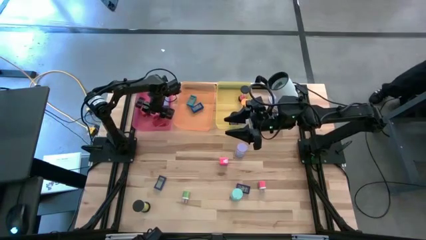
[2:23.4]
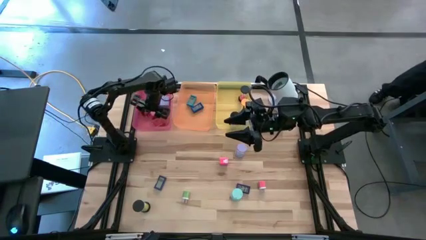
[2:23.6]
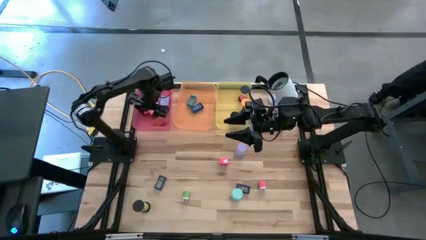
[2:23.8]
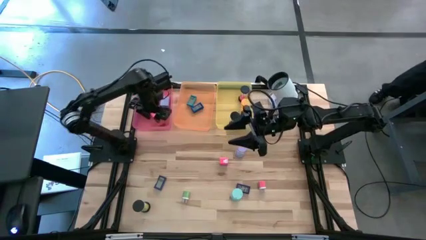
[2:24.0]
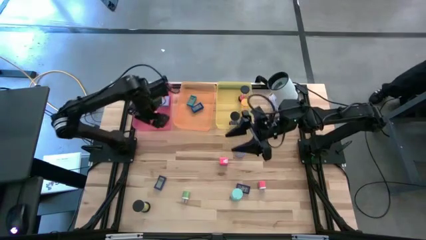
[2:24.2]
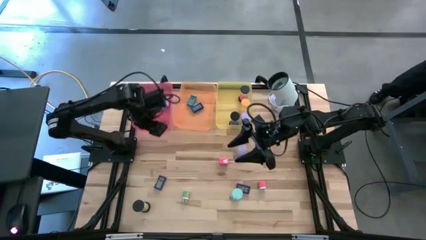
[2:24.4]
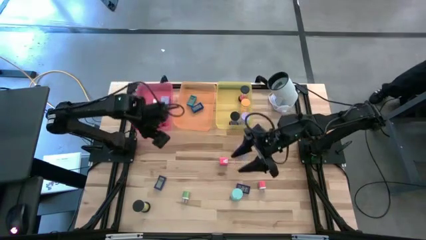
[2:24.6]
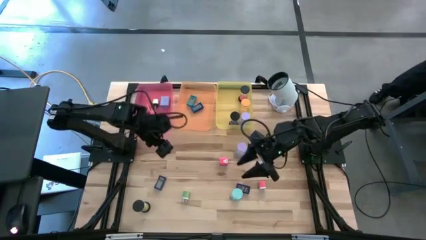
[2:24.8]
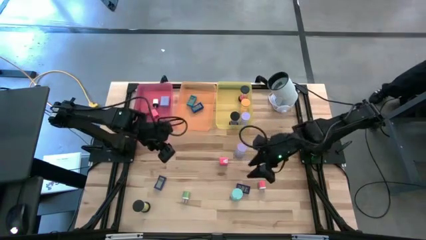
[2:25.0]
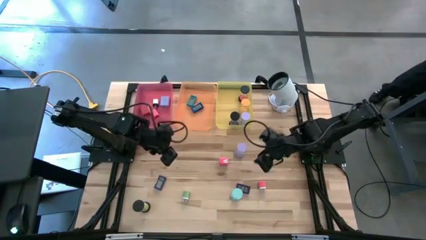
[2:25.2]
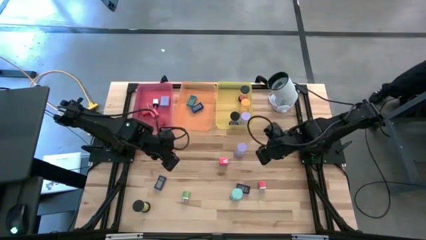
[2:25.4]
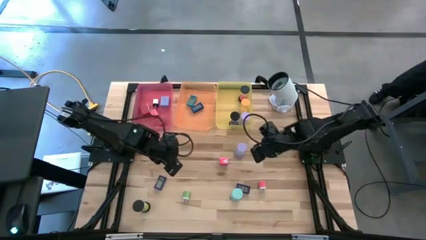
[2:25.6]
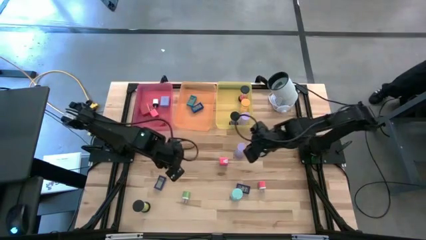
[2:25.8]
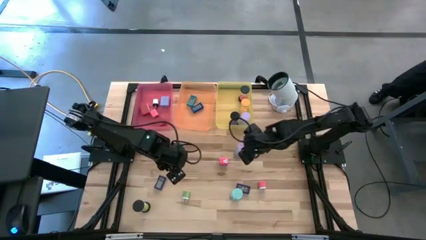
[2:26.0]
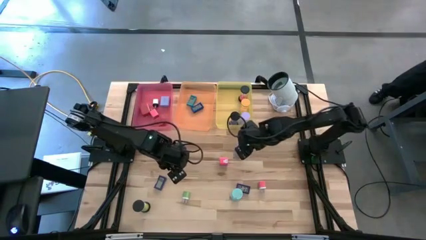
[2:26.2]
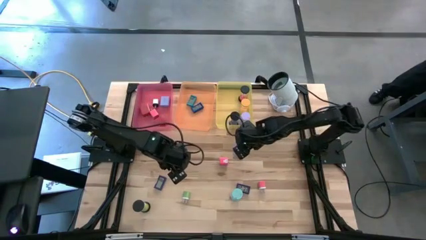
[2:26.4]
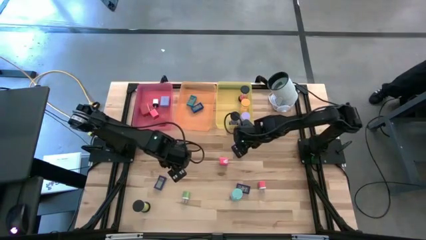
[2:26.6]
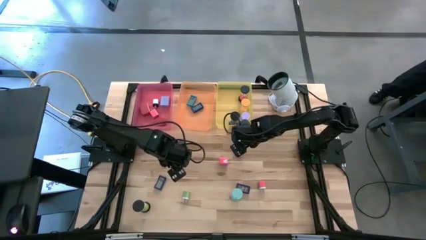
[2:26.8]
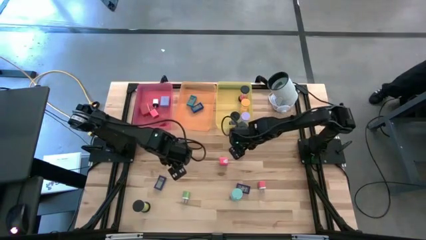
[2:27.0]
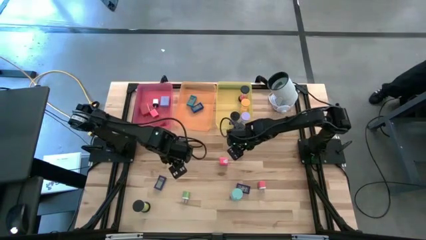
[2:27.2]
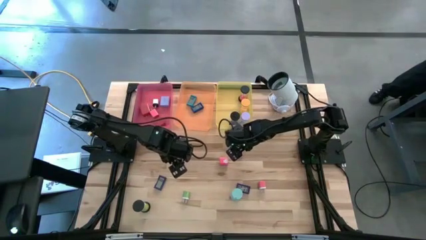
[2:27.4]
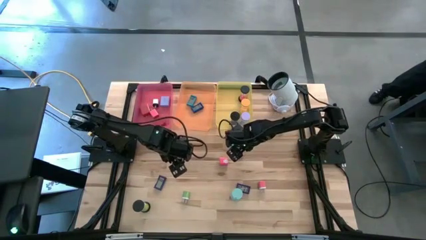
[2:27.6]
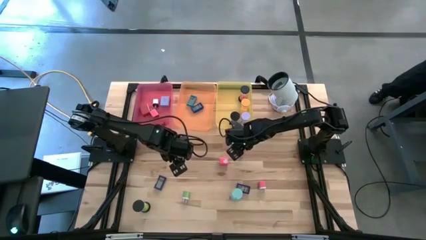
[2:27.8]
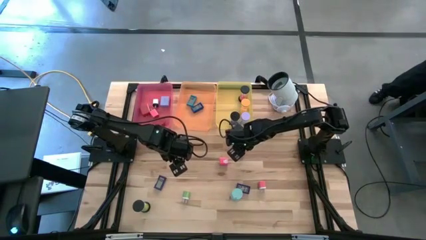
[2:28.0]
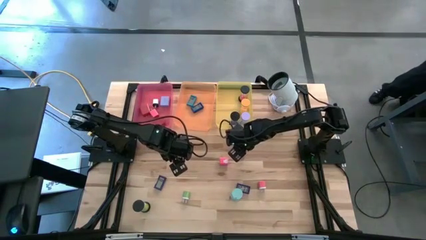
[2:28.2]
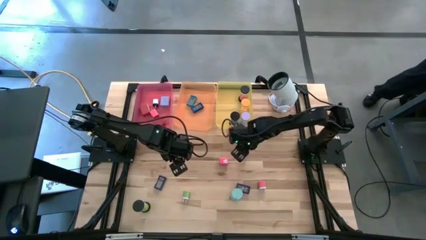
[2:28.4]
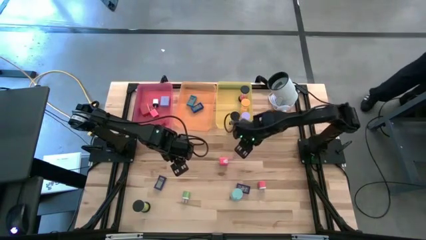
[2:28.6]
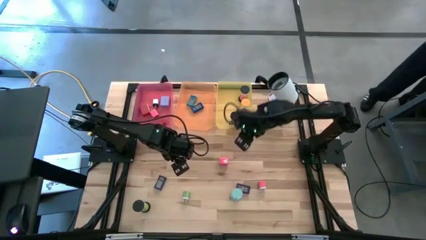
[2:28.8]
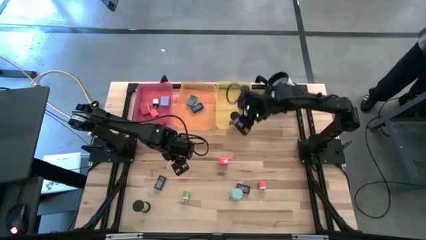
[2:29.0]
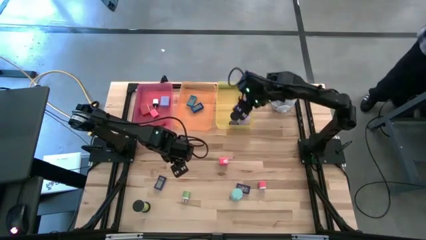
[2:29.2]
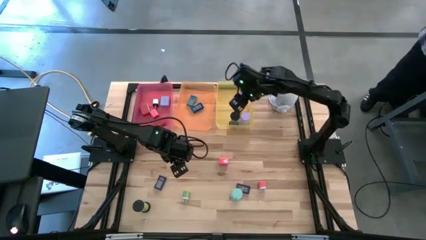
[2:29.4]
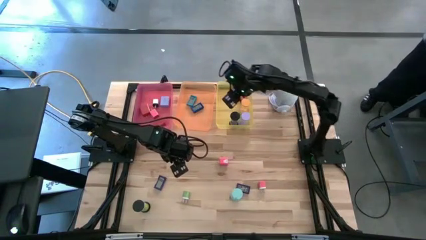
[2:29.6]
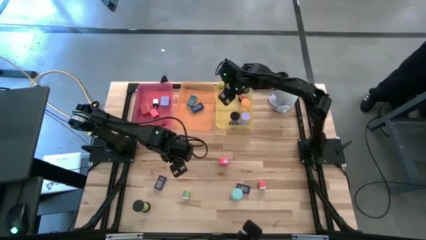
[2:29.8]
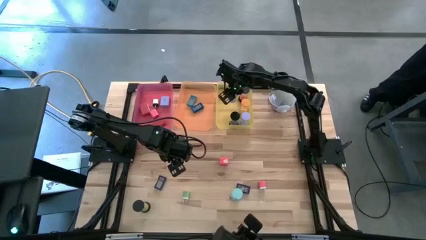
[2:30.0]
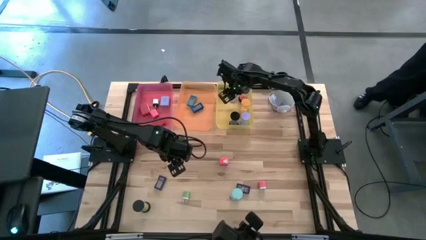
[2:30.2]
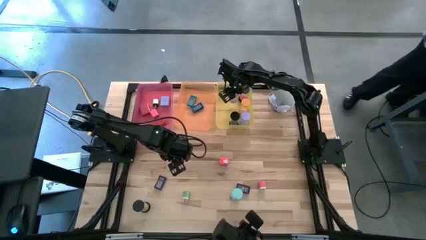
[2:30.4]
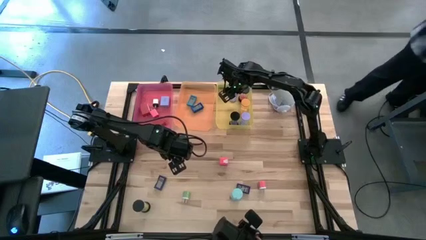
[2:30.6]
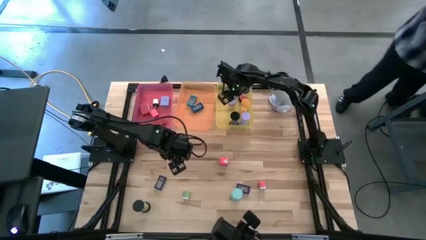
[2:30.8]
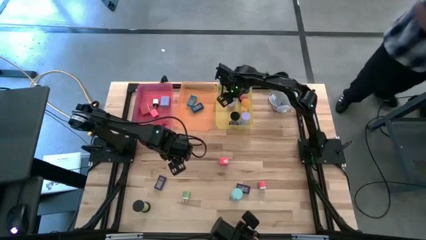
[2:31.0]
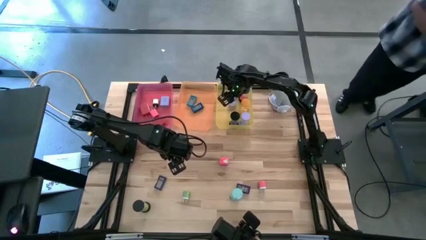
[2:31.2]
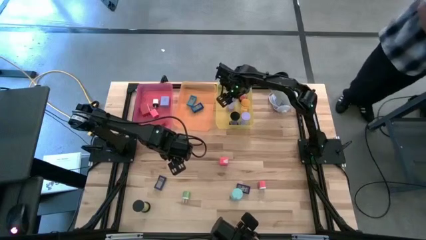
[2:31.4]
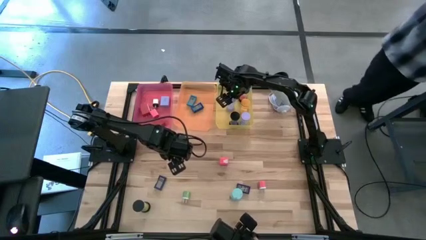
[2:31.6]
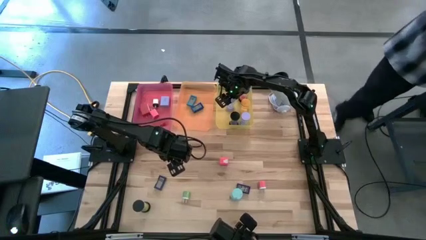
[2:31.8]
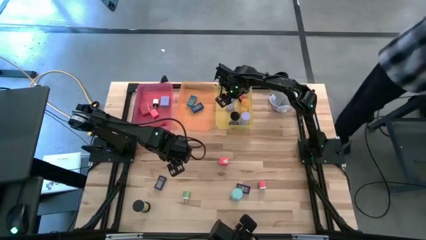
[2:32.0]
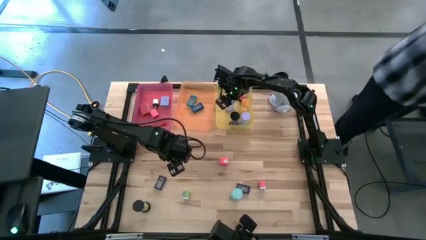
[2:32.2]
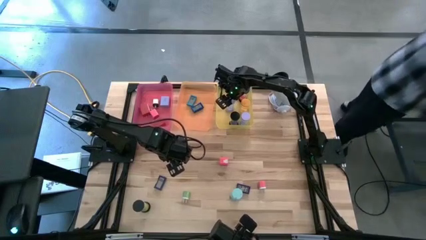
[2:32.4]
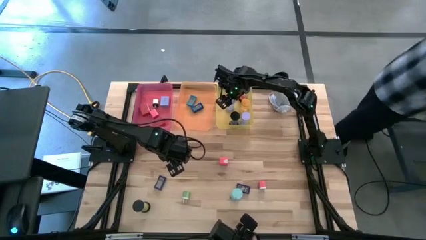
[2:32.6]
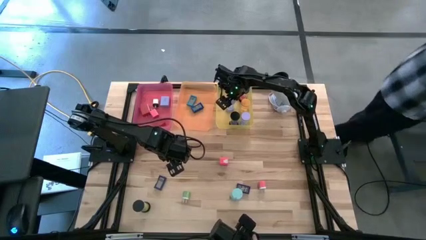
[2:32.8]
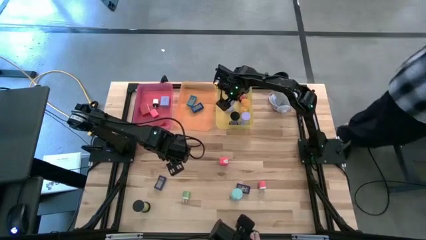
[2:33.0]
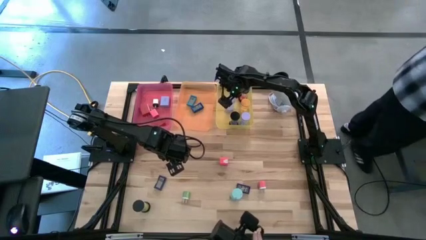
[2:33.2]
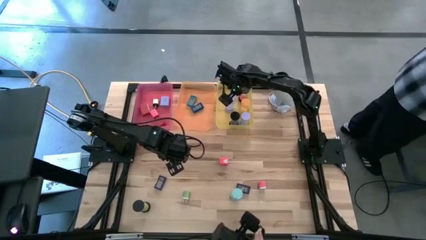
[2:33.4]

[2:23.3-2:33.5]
Task: Pick & Place Office items
Put the violet hourglass into the yellow bin

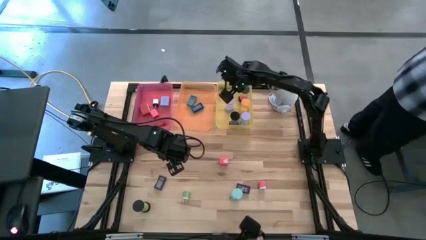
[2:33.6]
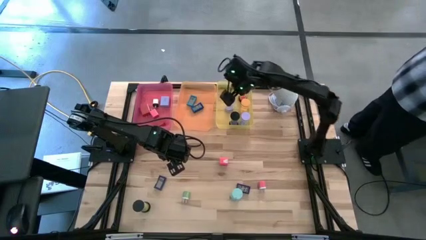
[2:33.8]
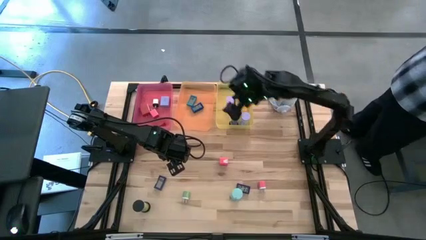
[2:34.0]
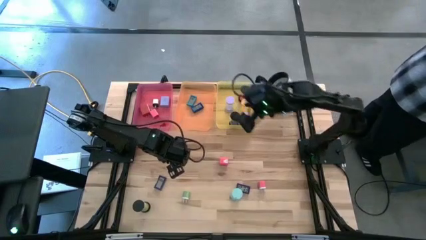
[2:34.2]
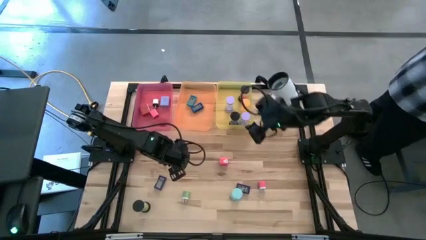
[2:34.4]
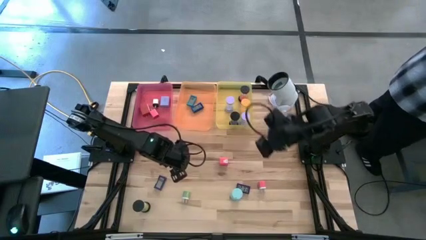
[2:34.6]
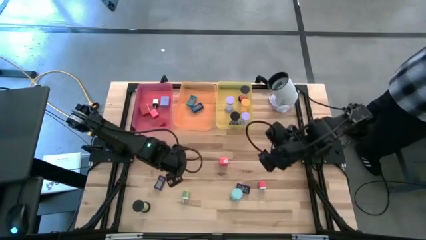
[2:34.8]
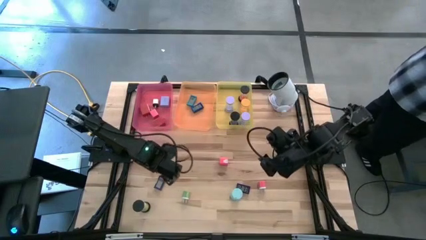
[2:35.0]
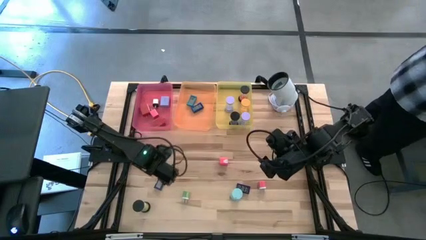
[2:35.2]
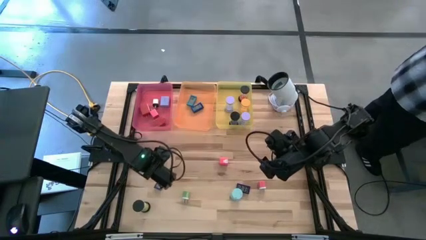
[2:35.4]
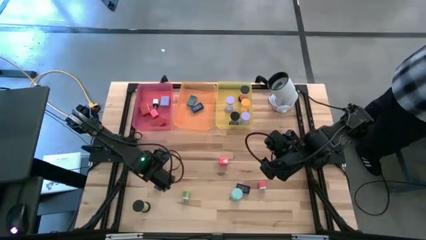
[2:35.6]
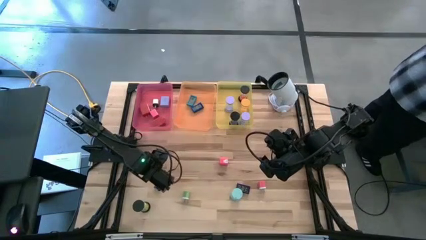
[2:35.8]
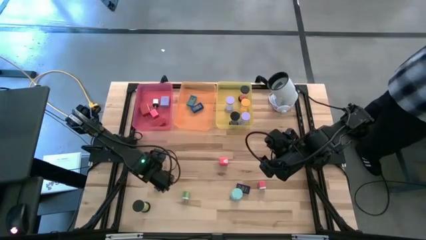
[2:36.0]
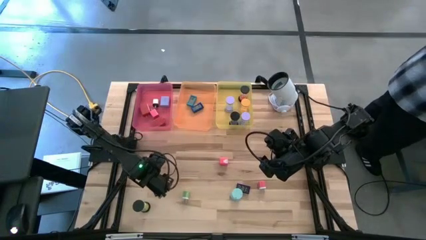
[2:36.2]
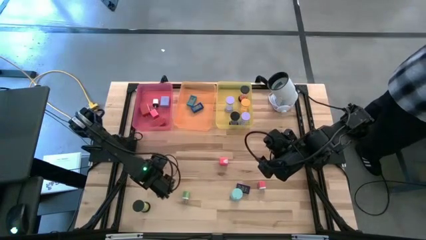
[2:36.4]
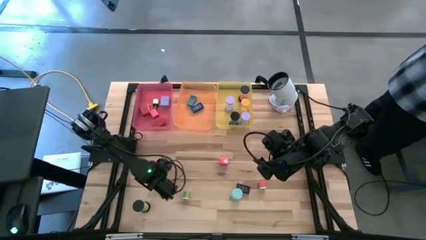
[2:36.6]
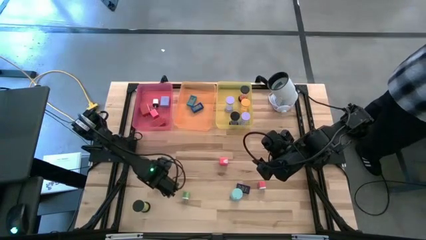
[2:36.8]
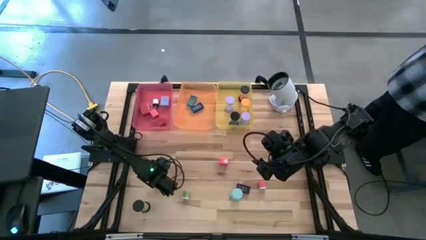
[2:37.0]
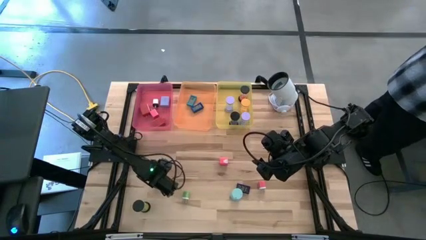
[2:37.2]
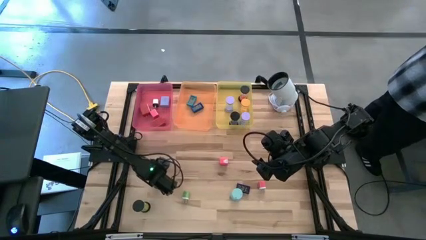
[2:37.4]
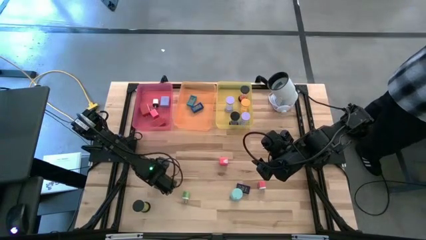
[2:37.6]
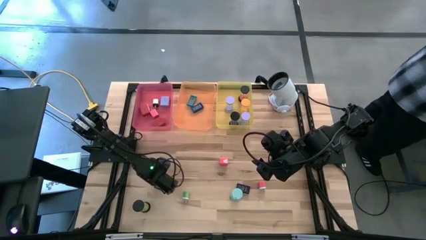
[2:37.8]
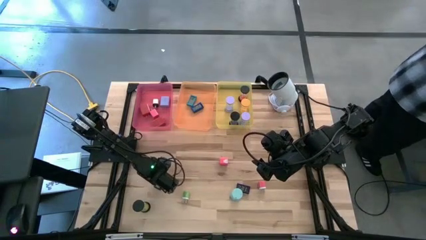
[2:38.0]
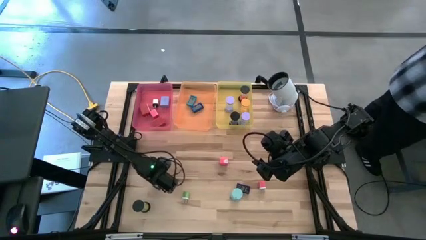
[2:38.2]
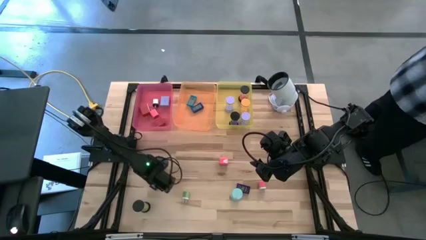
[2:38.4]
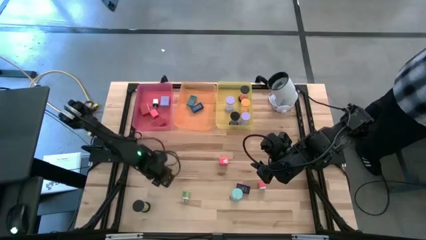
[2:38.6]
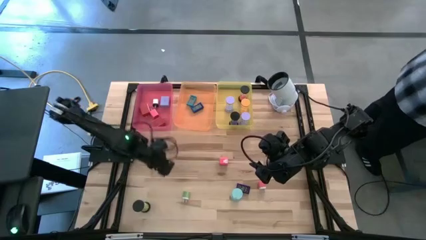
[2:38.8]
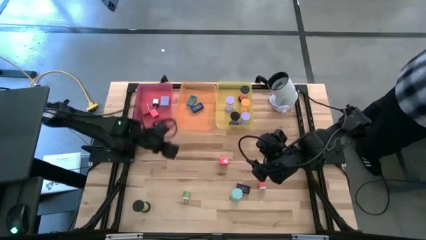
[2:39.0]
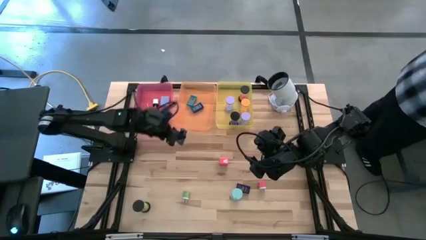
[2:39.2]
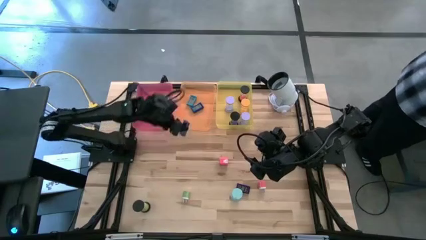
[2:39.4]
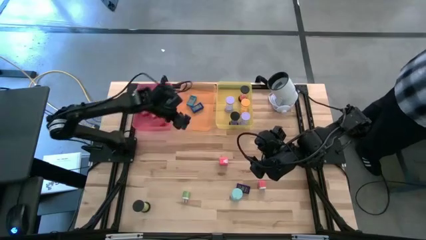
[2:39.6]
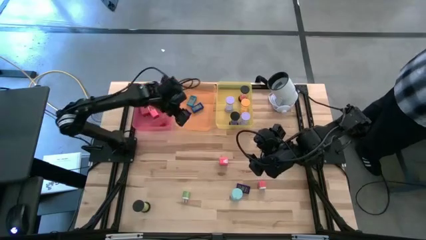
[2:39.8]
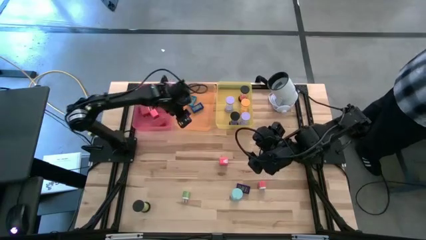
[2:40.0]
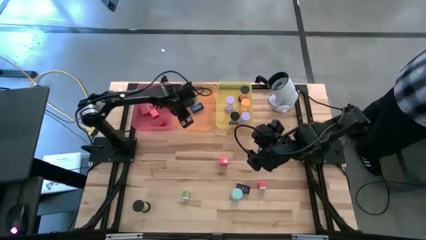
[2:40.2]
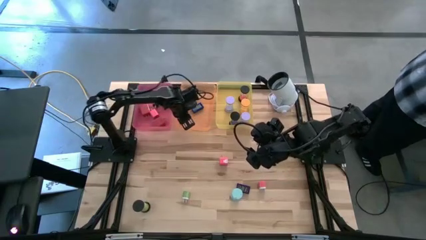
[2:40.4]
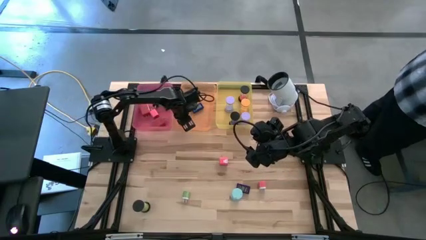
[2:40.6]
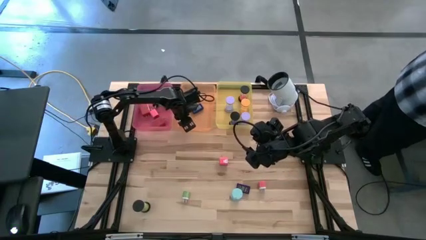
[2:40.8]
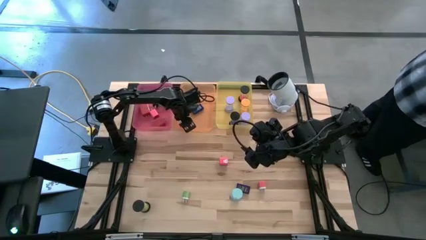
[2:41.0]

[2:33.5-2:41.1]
Put the left dark blue digital clock into the orange bin
